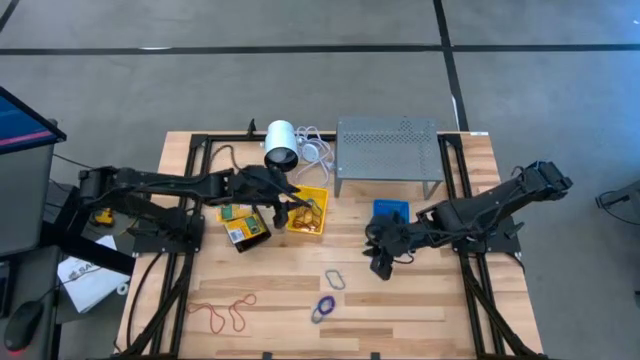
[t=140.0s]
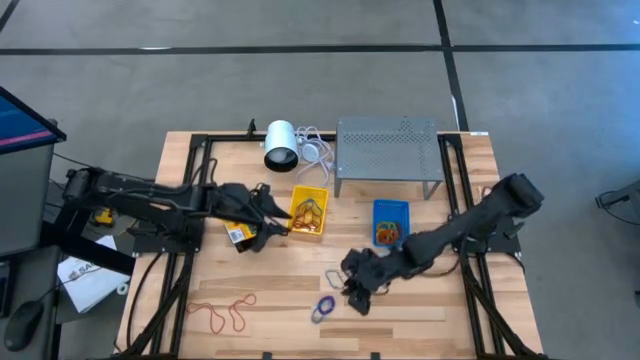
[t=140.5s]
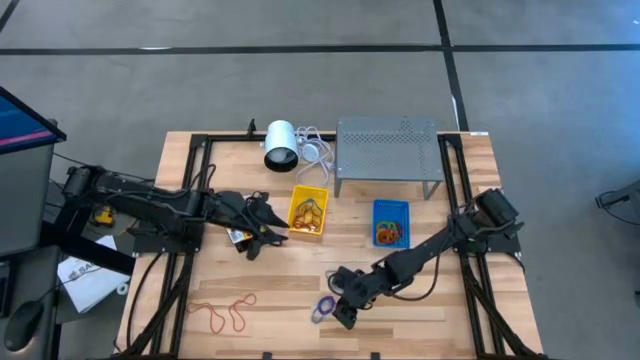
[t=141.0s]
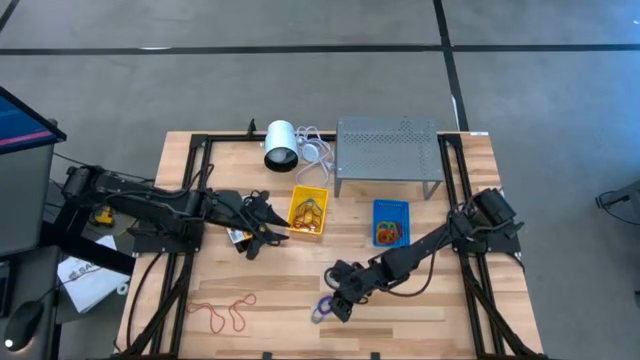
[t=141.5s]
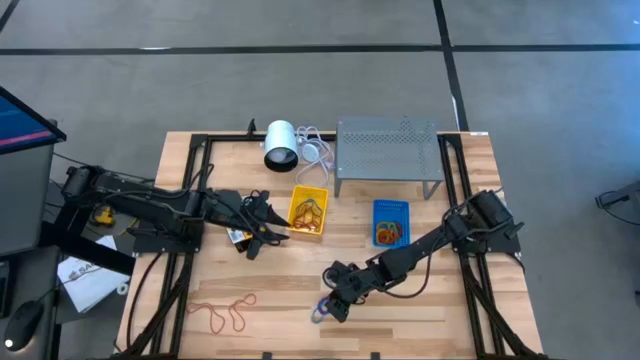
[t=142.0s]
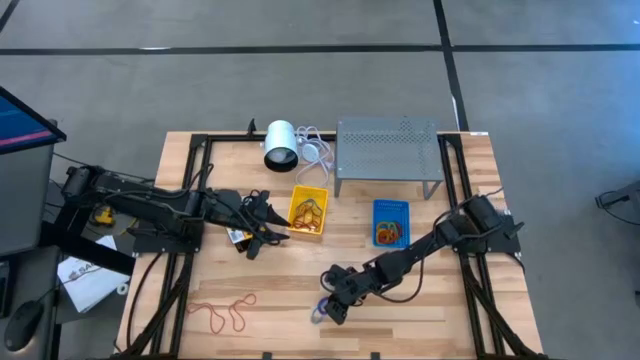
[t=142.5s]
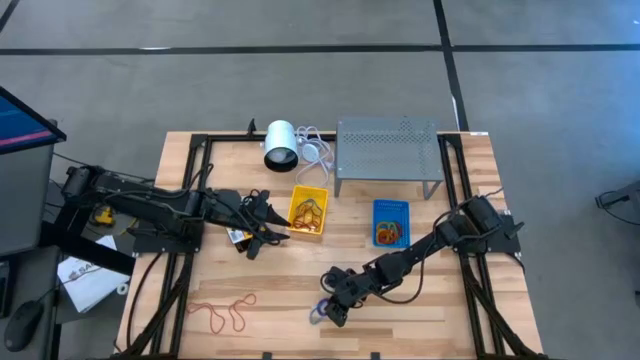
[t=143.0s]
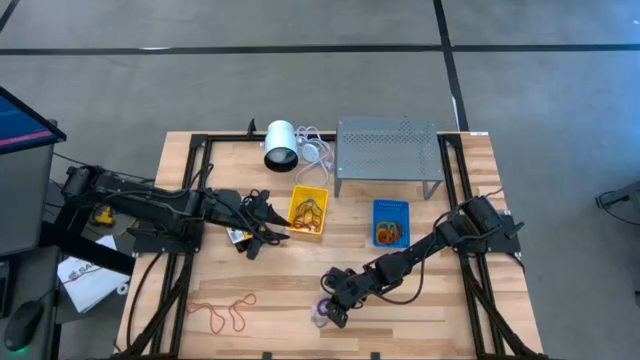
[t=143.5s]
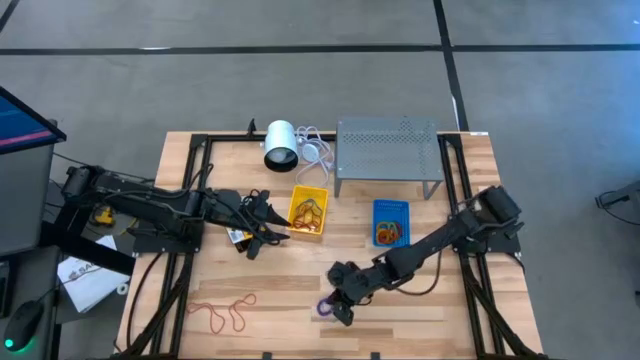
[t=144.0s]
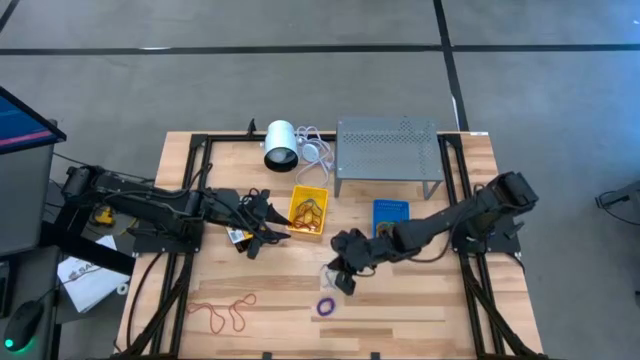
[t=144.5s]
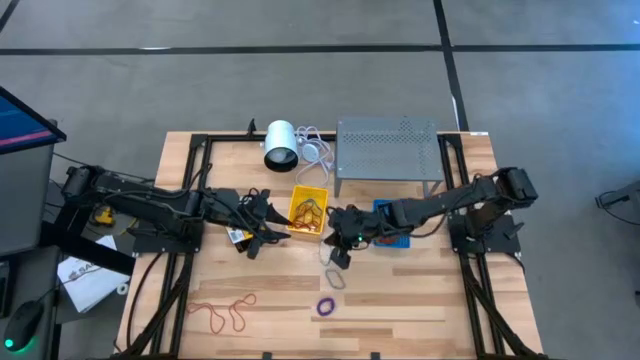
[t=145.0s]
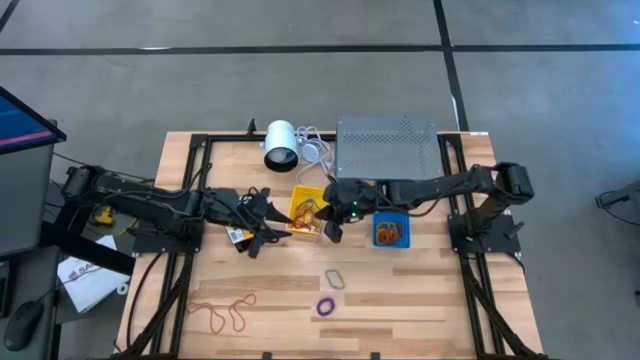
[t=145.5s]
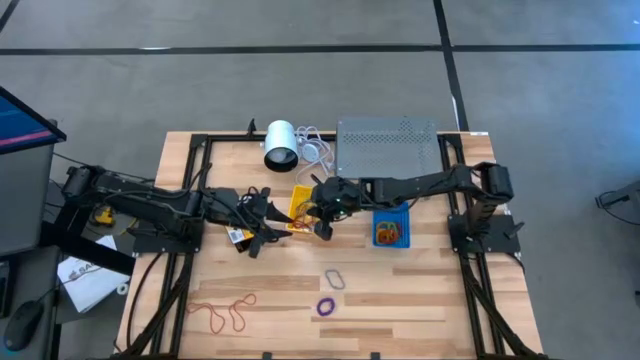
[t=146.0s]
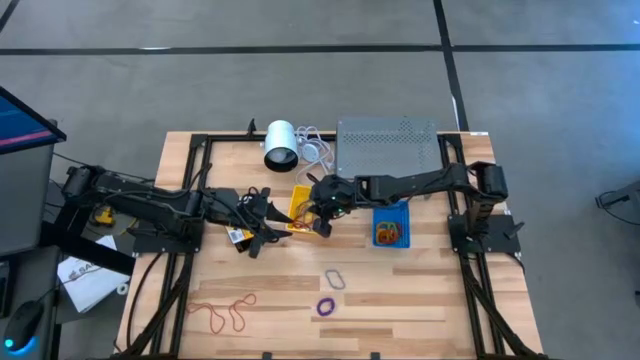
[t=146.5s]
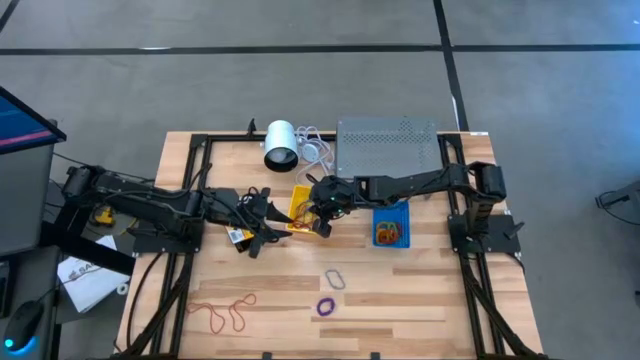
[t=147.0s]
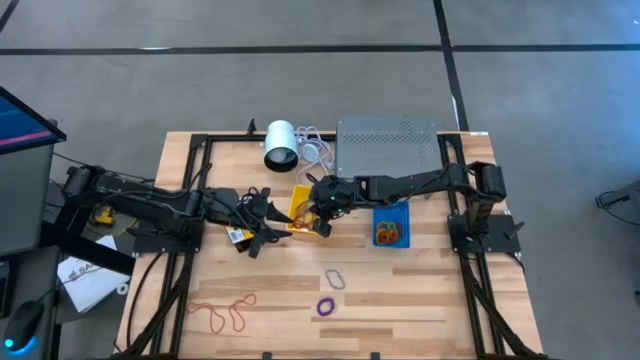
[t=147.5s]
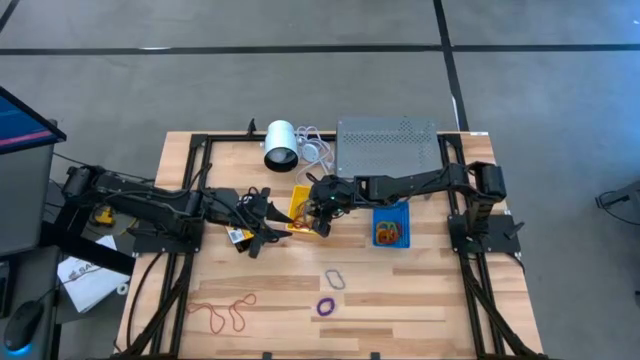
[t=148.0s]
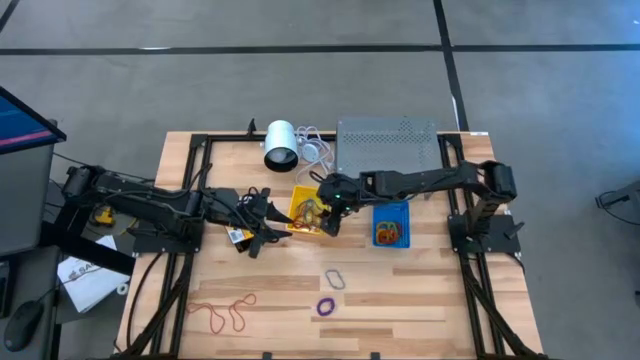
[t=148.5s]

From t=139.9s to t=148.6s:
Task: Pick & Place Office Desk Supplies
Put the bottom blue rubber band into the yellow basket

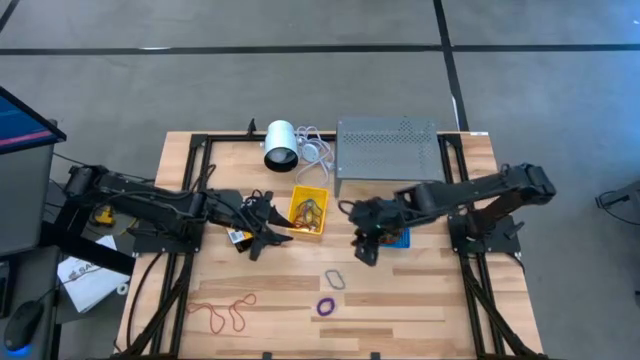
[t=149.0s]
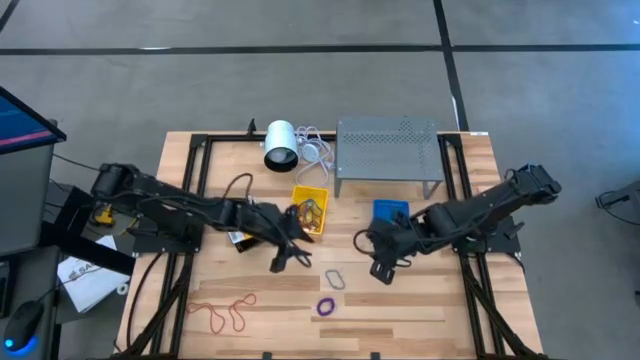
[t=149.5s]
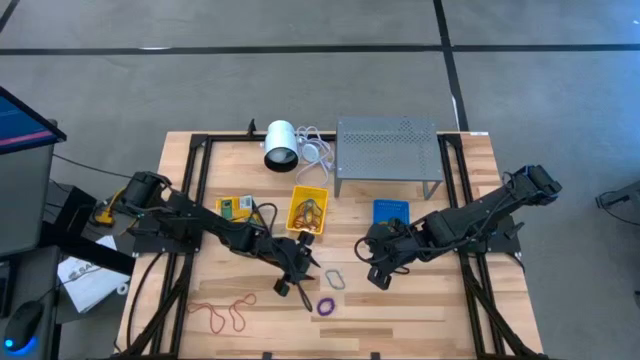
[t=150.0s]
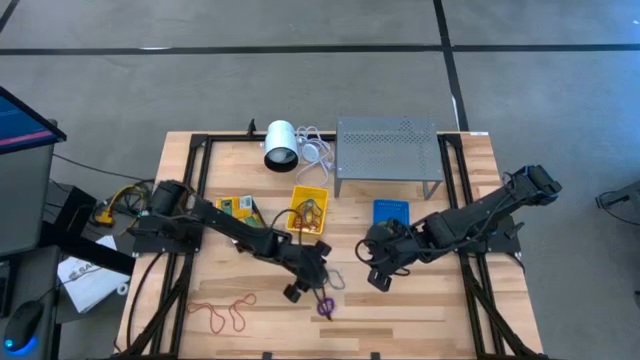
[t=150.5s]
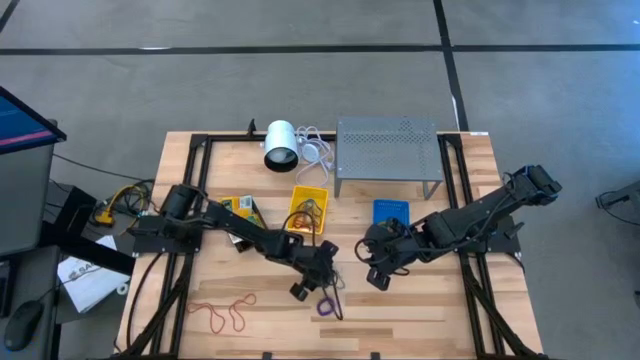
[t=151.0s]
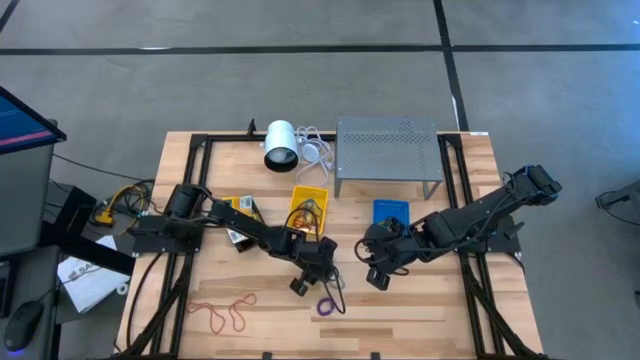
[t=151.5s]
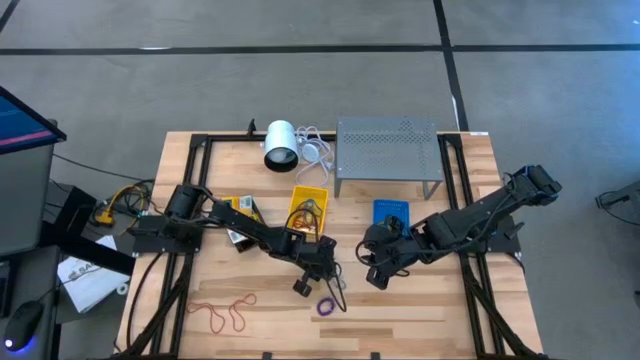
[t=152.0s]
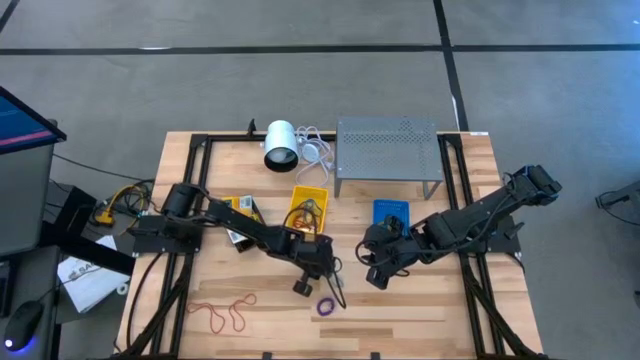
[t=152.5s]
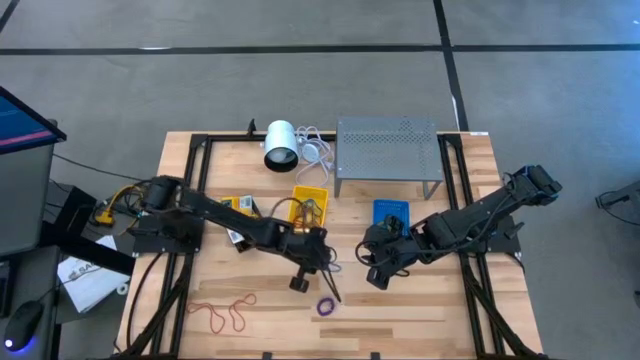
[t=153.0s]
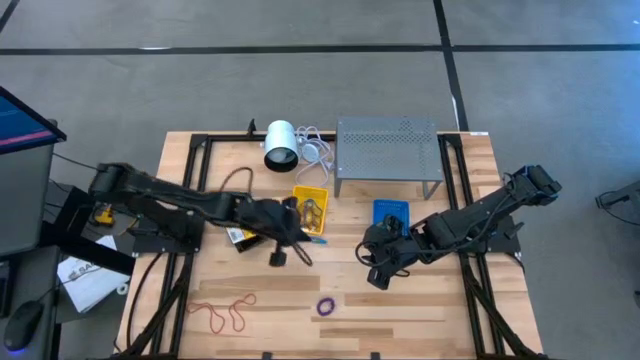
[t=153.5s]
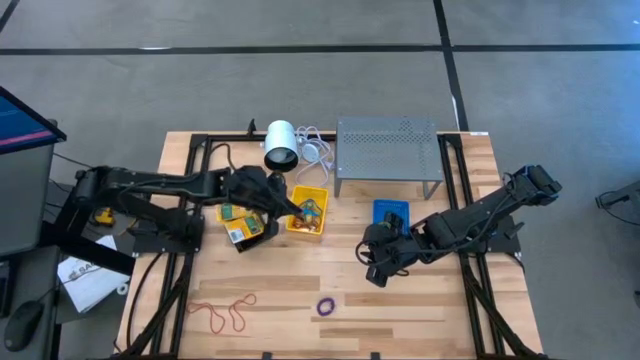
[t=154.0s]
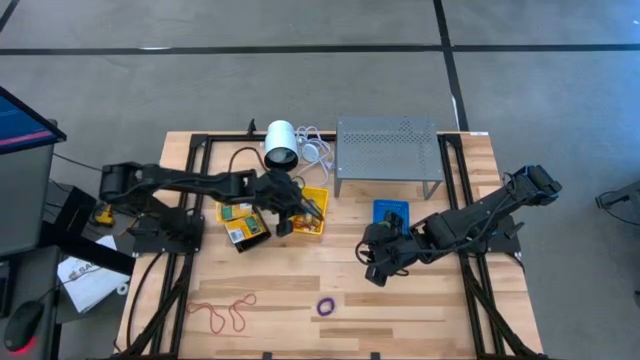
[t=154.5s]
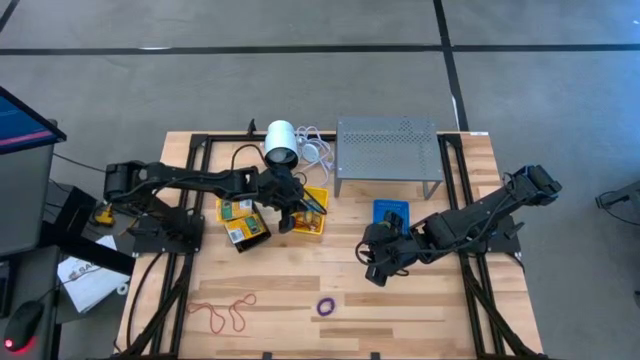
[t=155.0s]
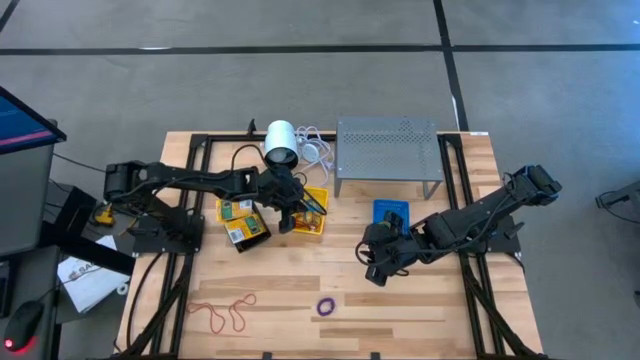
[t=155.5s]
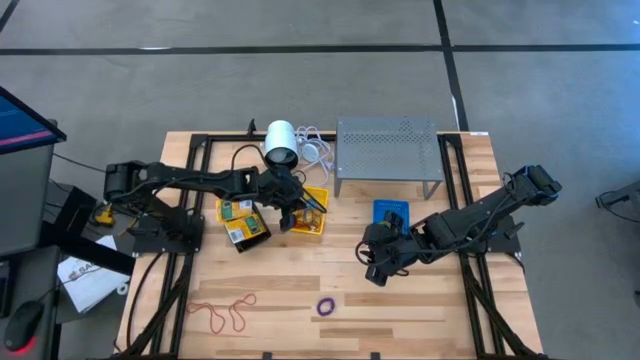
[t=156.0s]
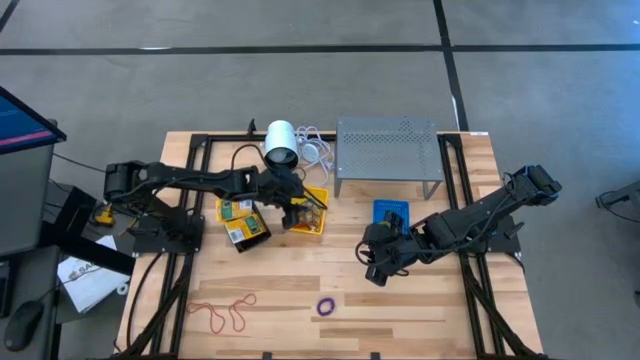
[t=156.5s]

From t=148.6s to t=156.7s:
Put the blue rubber band into the yellow basket

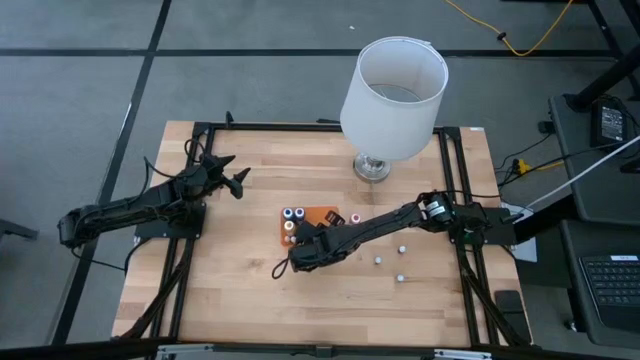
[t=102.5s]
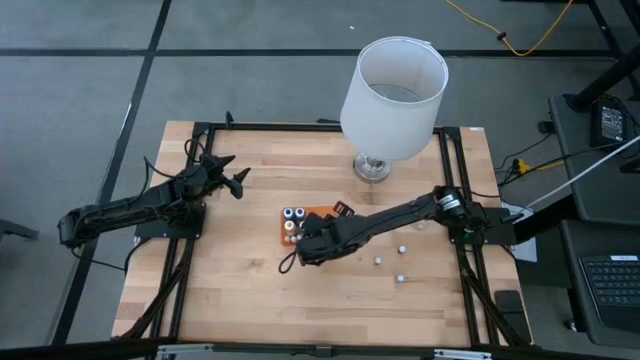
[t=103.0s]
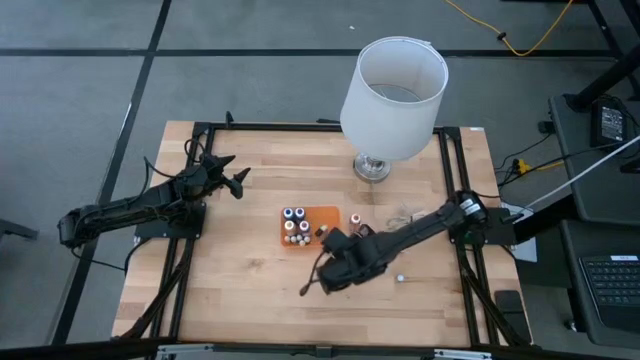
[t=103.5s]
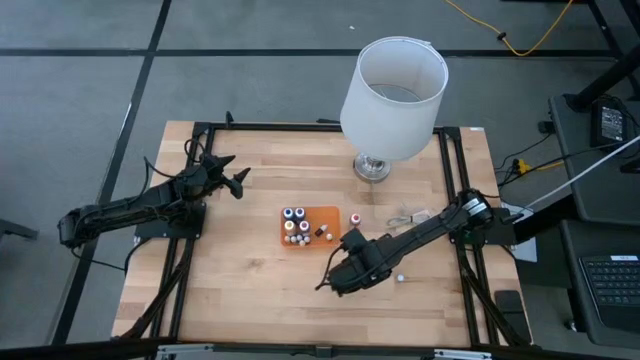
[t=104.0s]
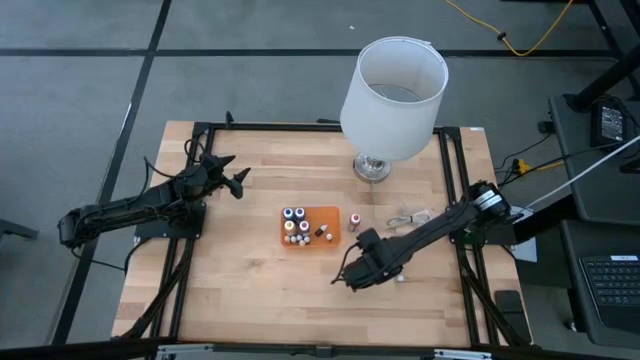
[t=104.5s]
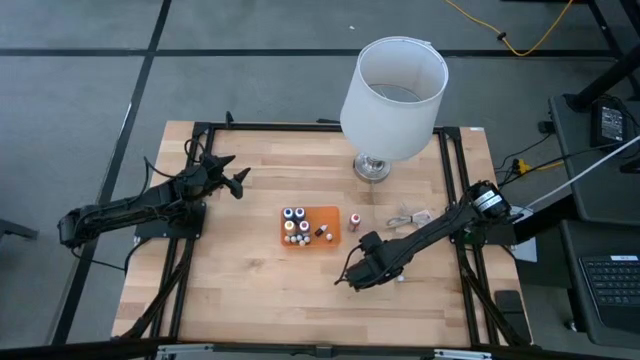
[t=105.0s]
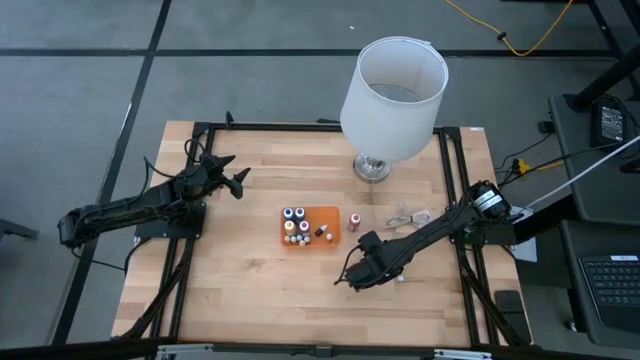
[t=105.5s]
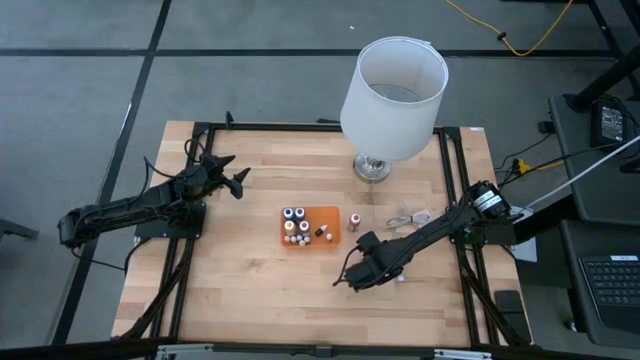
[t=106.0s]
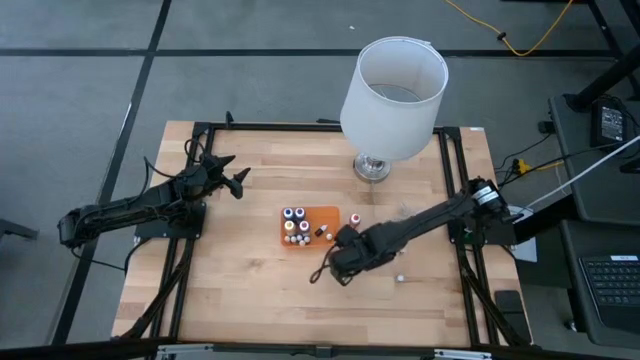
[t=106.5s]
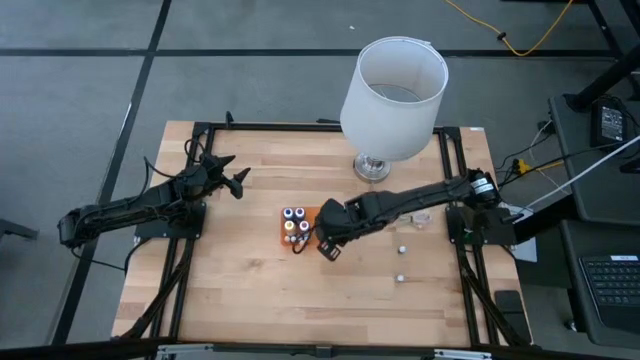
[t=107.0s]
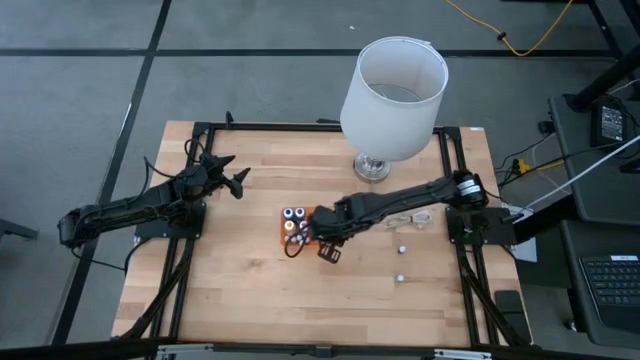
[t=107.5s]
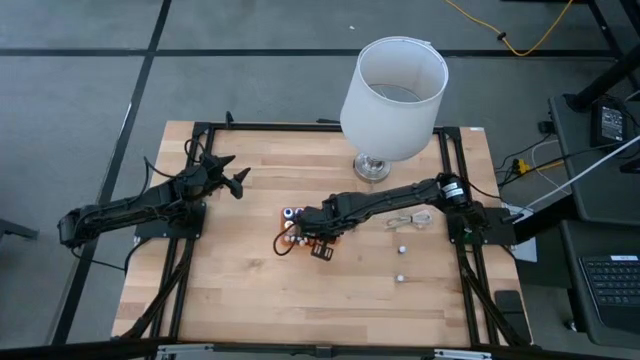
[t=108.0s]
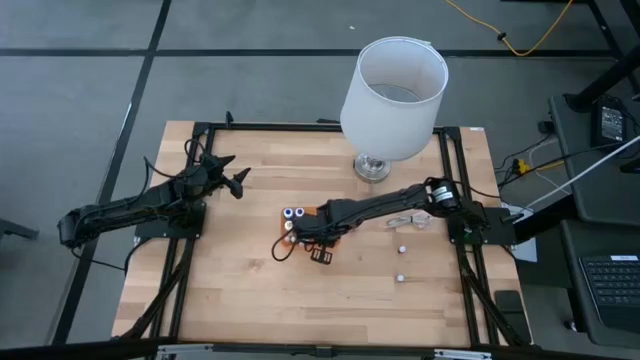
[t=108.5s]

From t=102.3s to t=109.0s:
Task: Pick & Place food coloring
Put the left small red food coloring bottle into the orange bin
